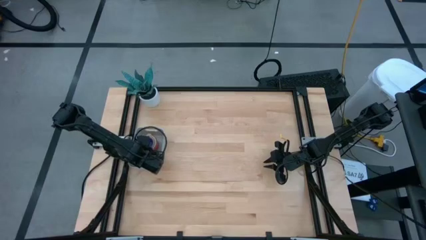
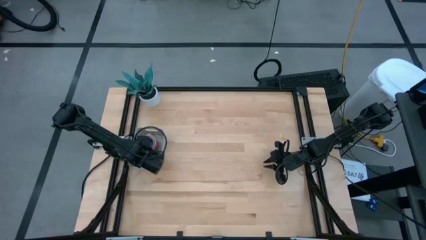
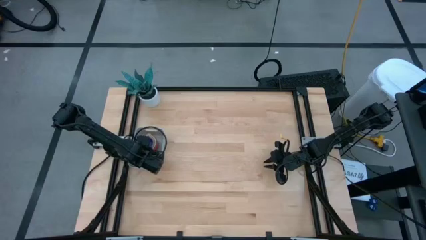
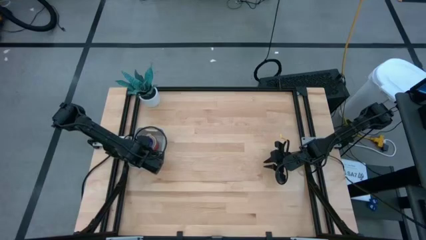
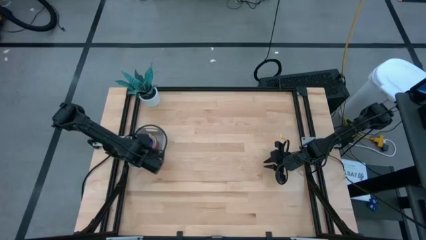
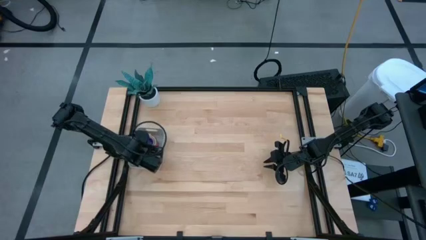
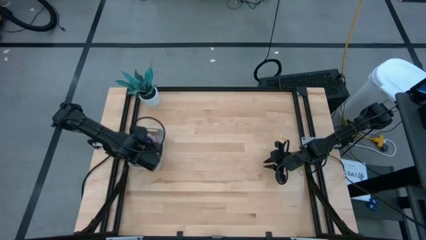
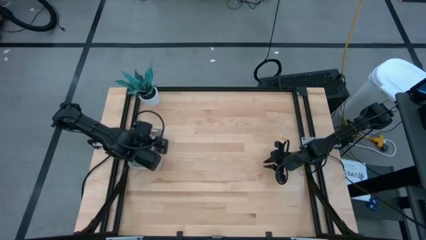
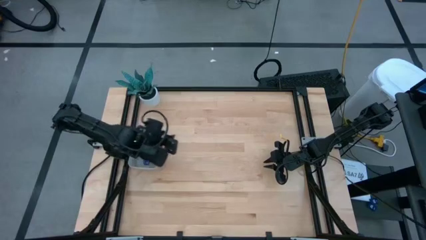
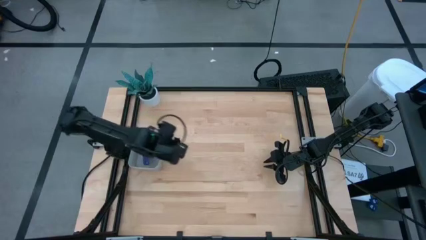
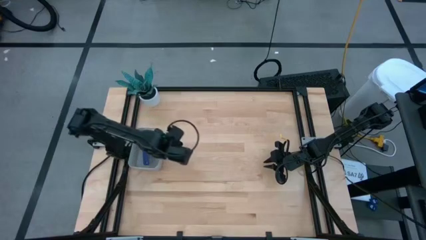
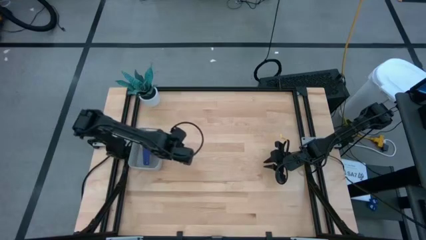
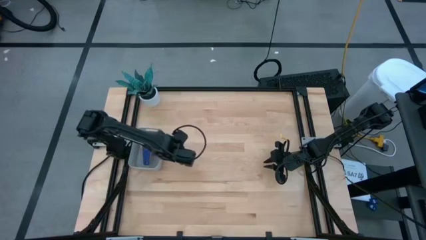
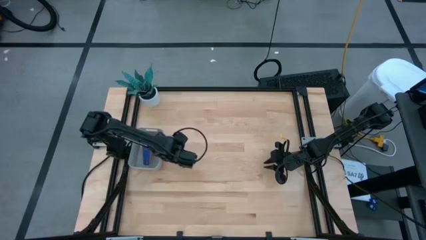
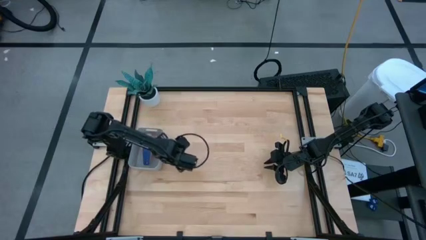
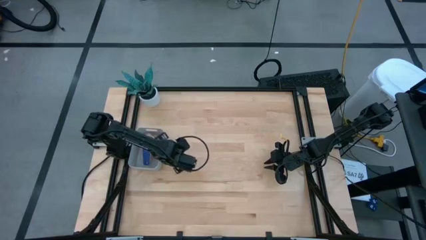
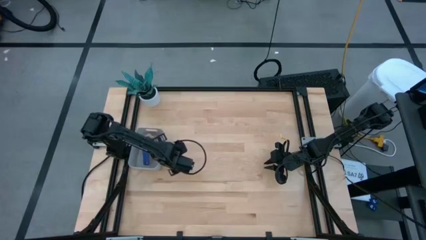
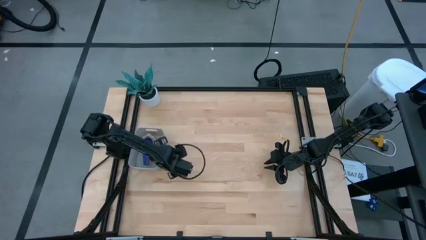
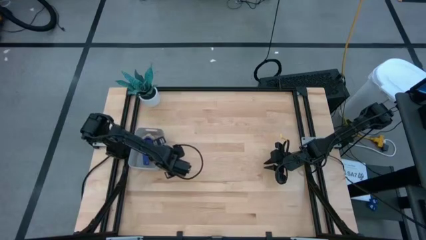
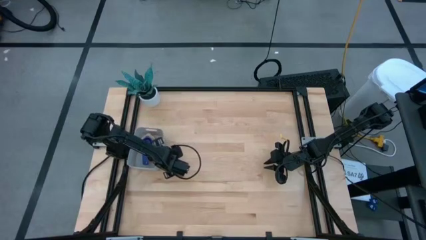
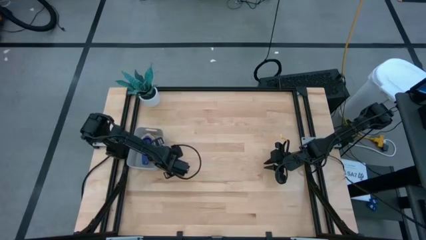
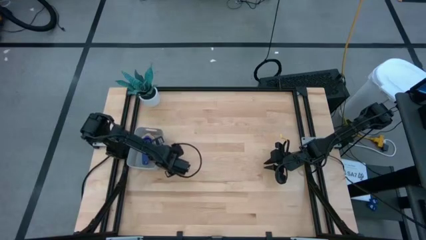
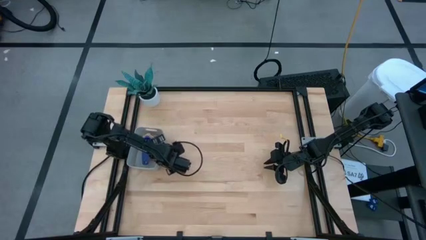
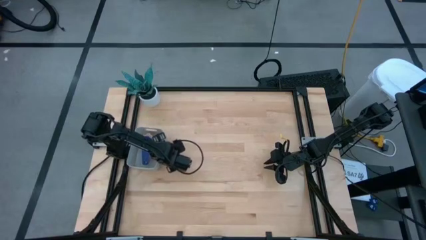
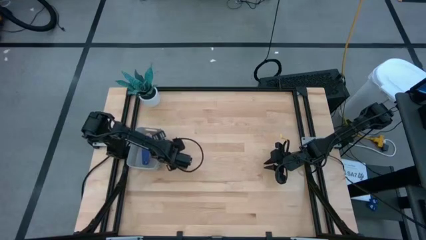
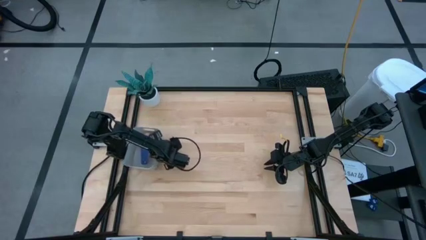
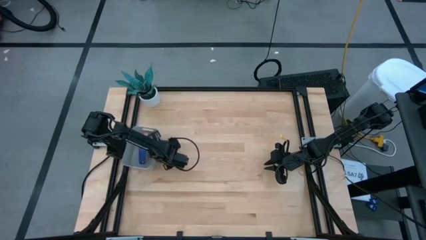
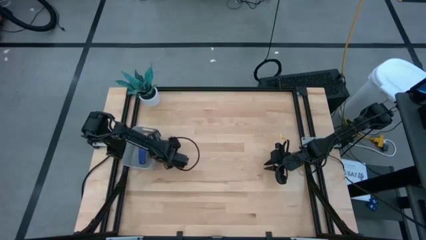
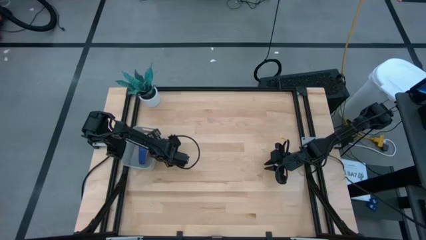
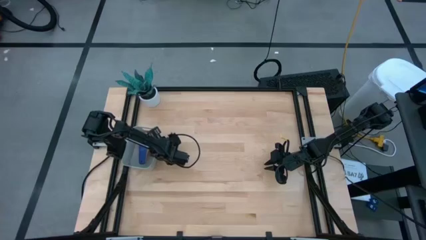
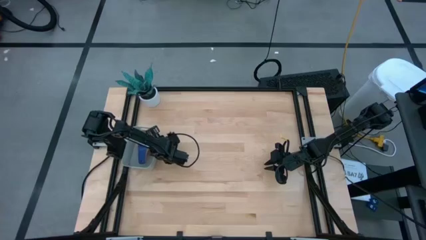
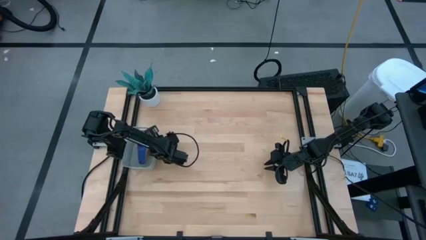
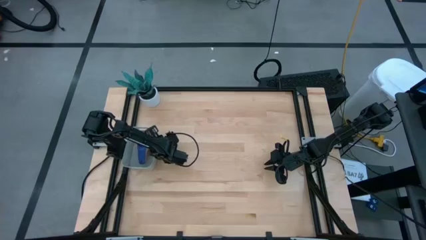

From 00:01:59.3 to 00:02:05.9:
Task: Nest measuring cups in basket
Adjust the gray bin

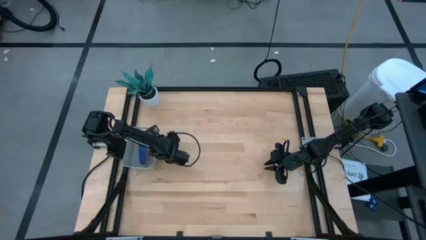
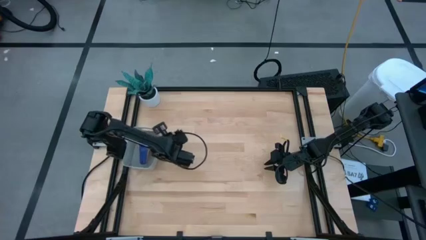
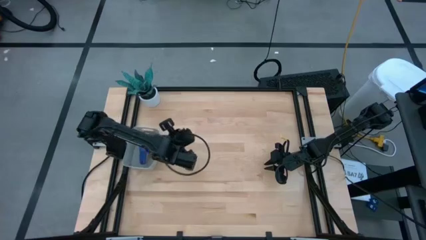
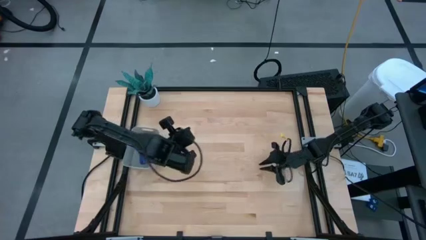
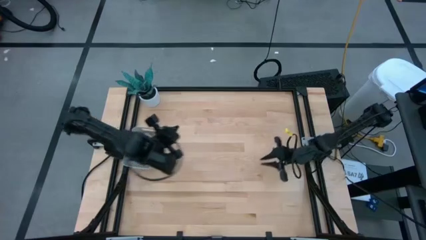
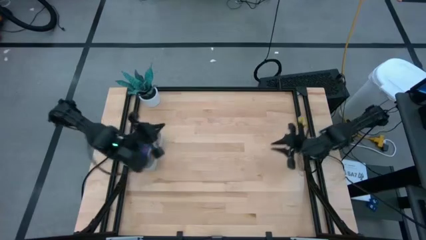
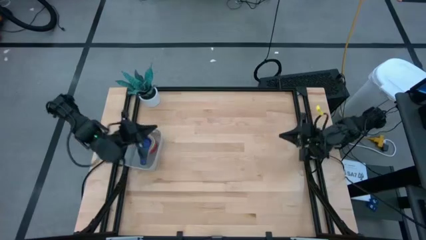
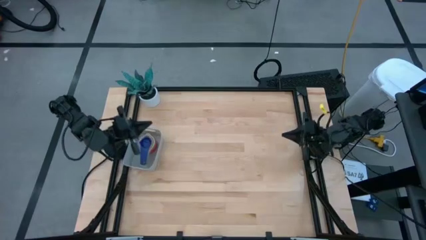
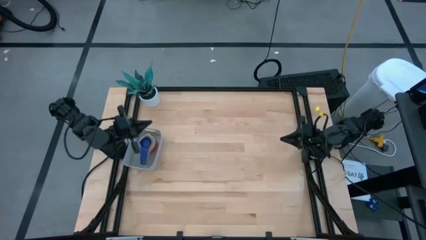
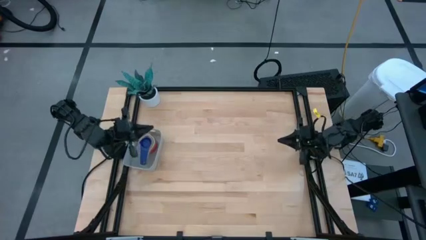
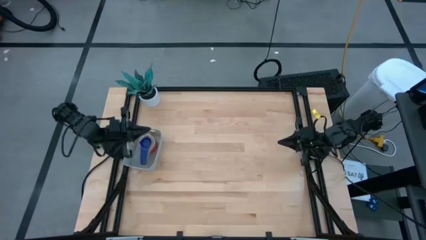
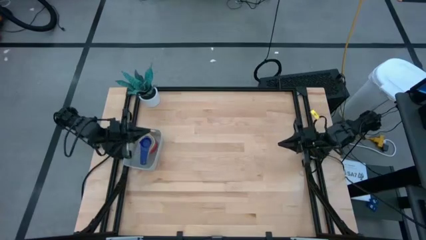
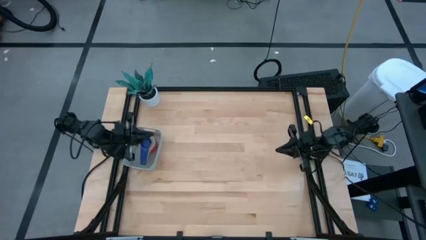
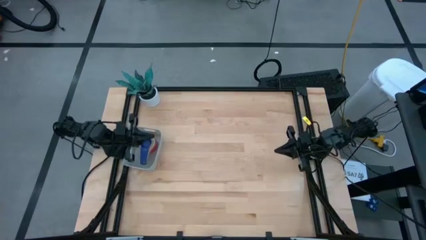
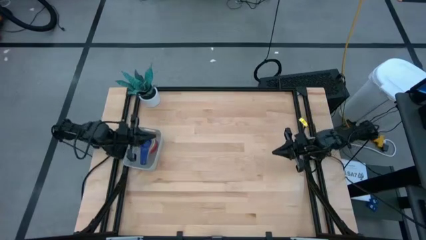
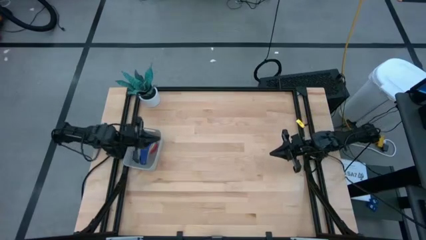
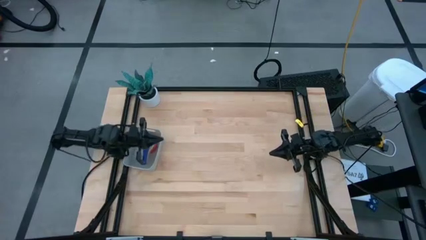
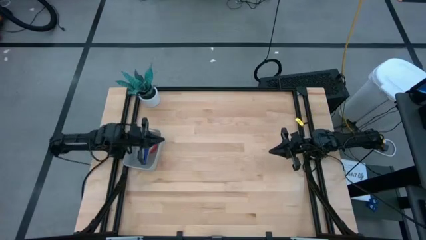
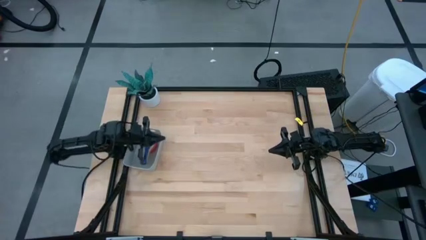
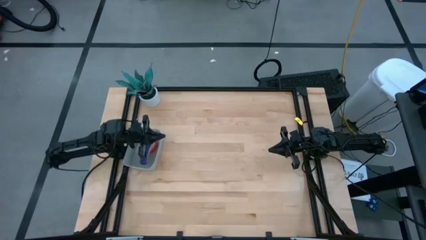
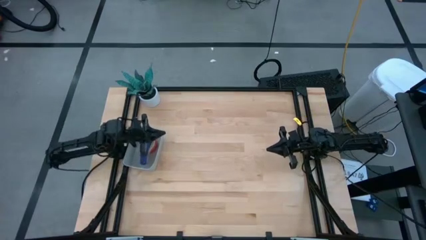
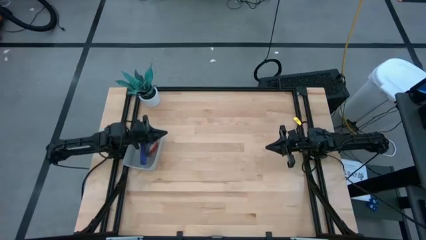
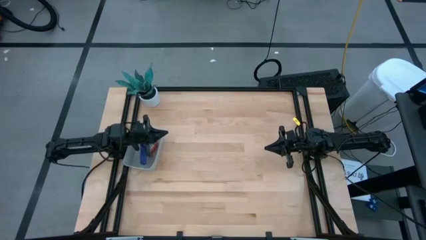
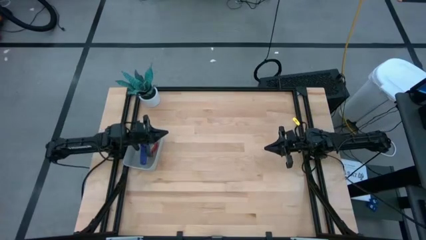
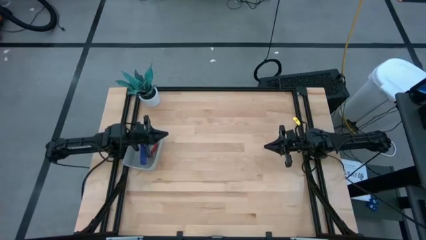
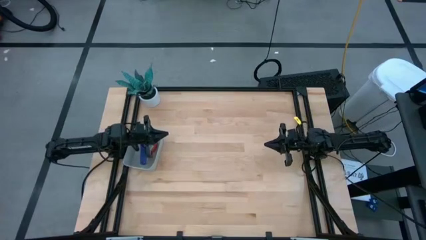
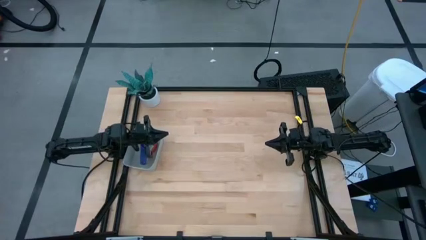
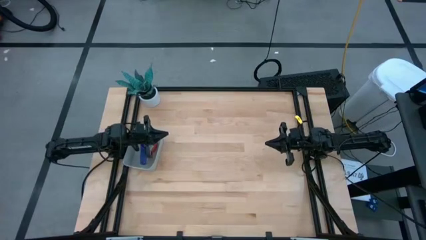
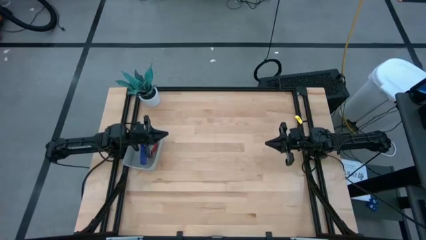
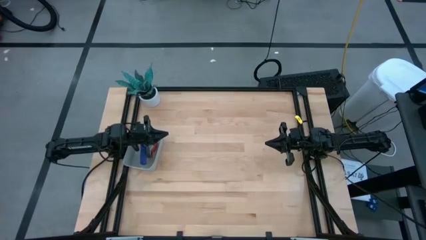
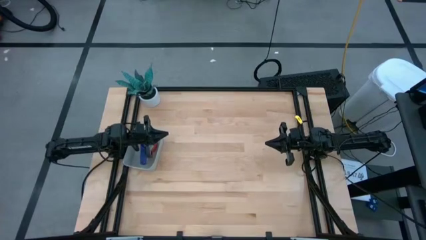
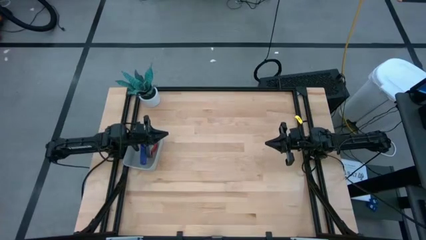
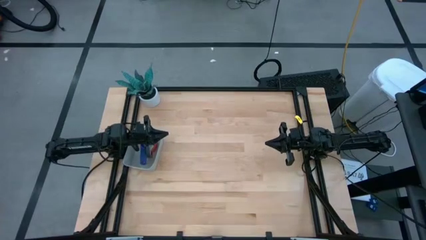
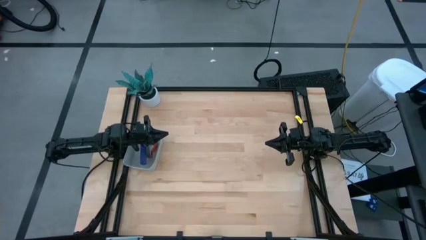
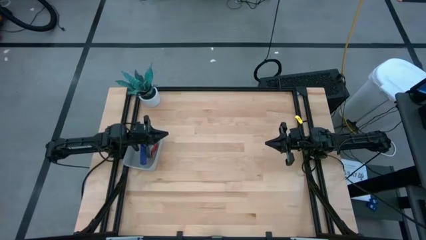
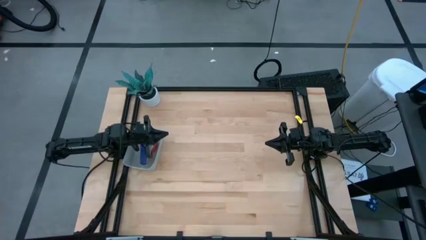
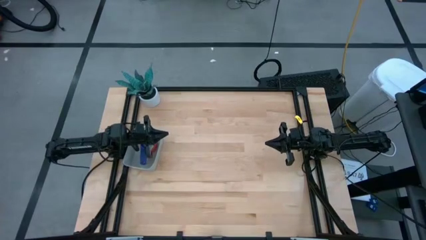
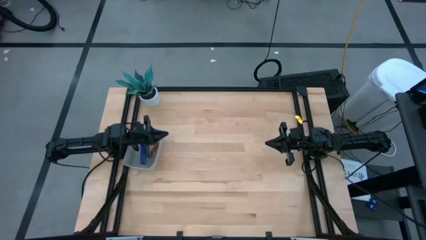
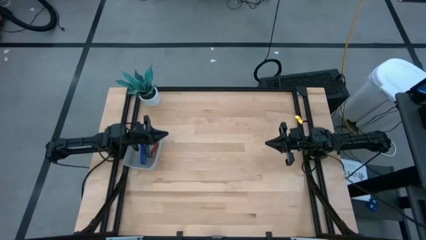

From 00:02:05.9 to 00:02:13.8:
Return to Home Position
